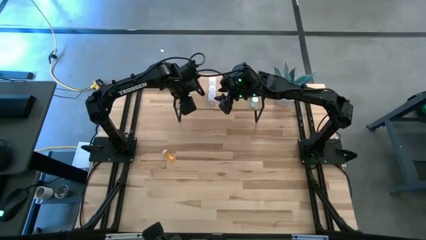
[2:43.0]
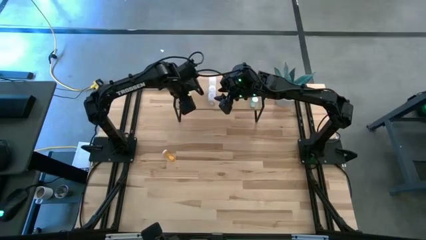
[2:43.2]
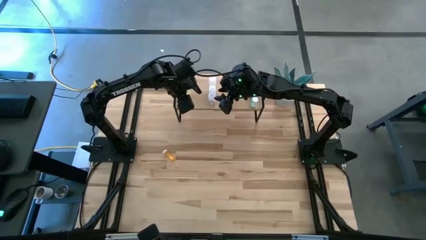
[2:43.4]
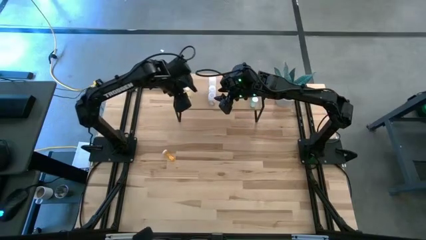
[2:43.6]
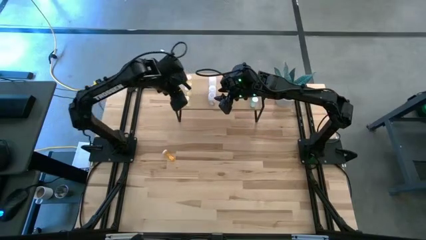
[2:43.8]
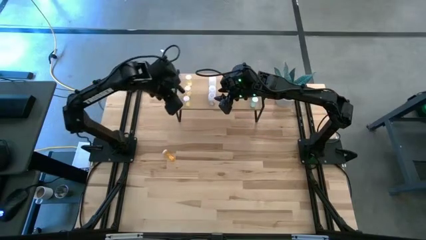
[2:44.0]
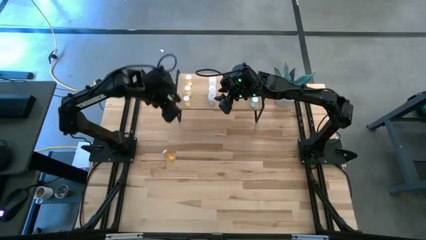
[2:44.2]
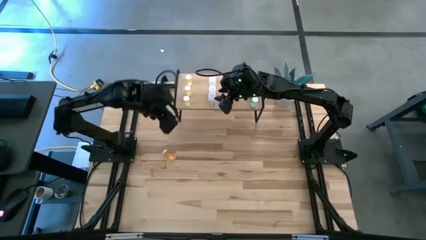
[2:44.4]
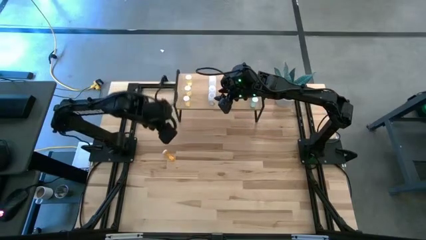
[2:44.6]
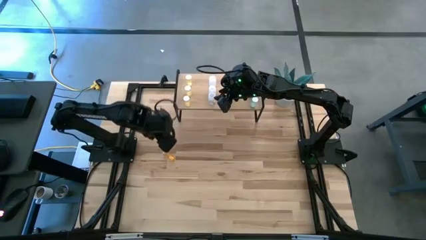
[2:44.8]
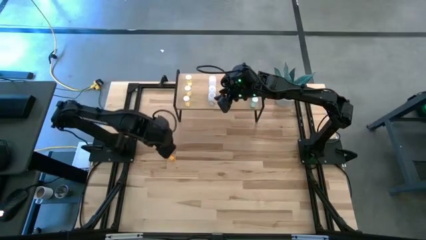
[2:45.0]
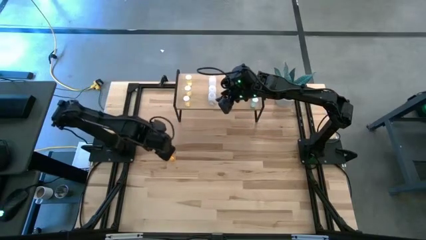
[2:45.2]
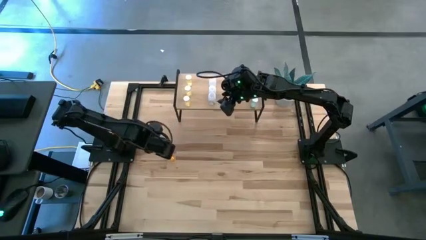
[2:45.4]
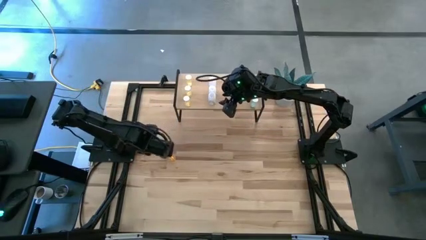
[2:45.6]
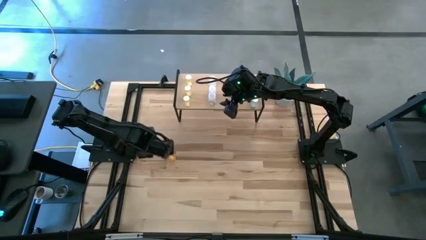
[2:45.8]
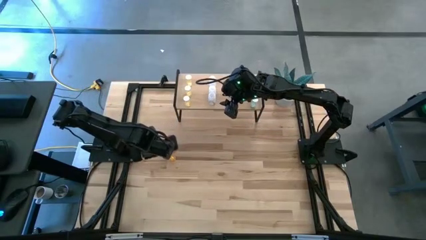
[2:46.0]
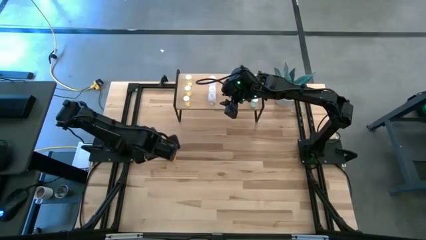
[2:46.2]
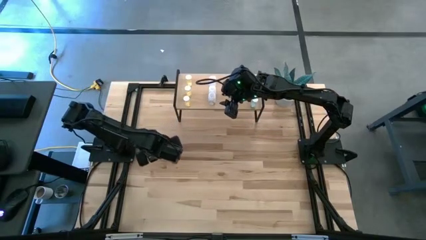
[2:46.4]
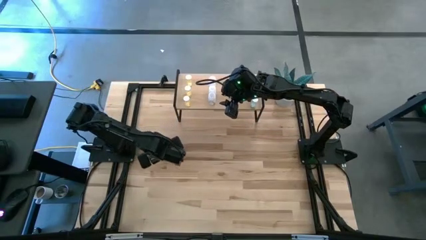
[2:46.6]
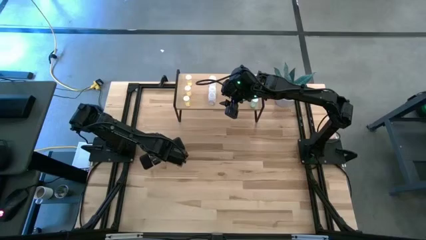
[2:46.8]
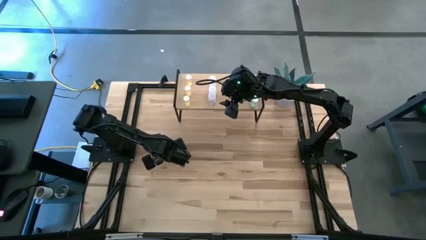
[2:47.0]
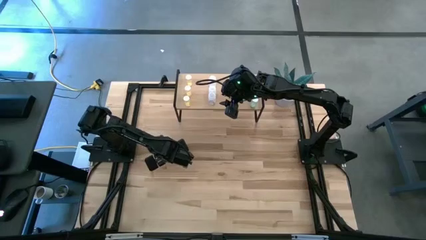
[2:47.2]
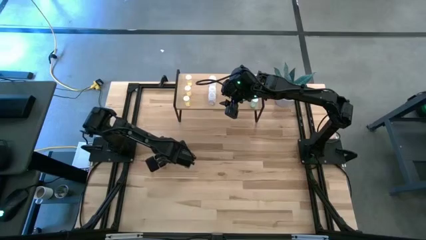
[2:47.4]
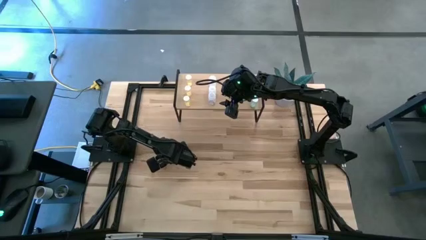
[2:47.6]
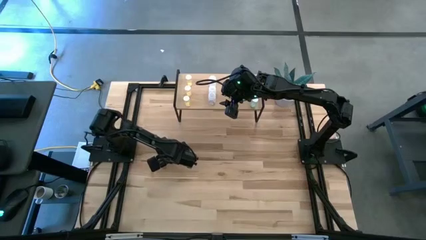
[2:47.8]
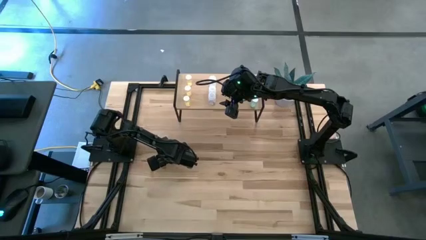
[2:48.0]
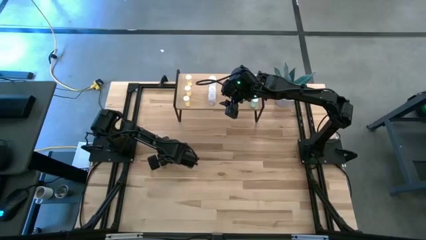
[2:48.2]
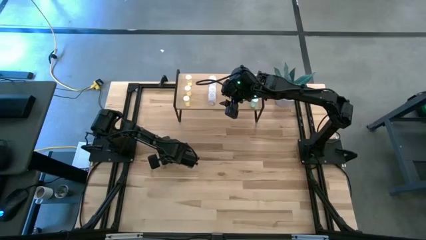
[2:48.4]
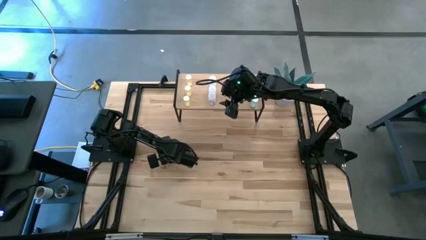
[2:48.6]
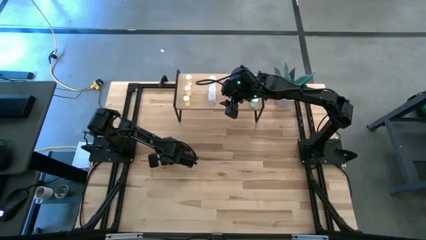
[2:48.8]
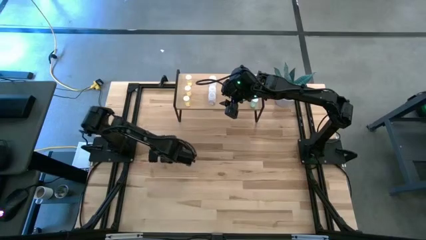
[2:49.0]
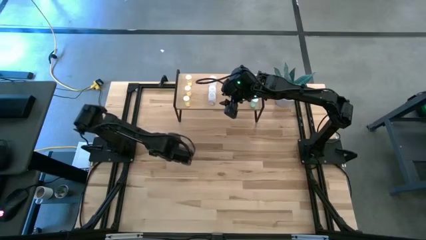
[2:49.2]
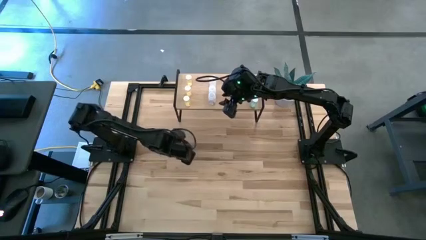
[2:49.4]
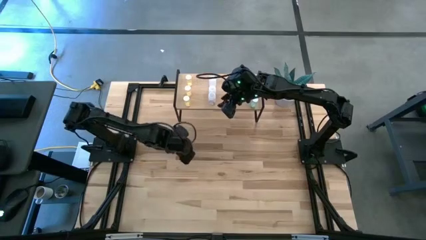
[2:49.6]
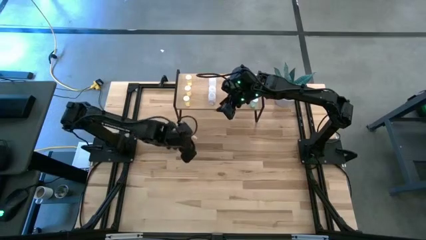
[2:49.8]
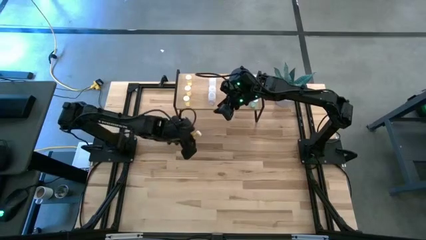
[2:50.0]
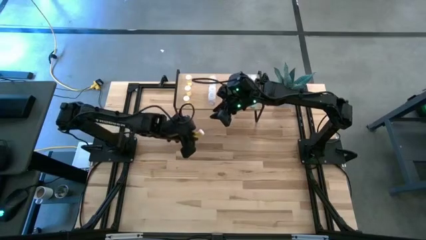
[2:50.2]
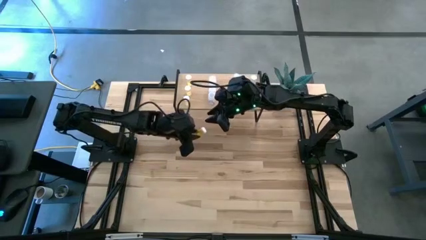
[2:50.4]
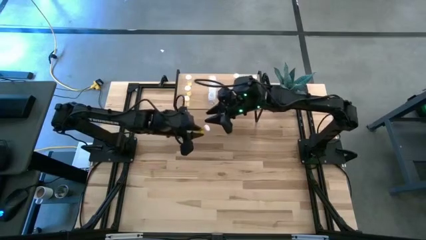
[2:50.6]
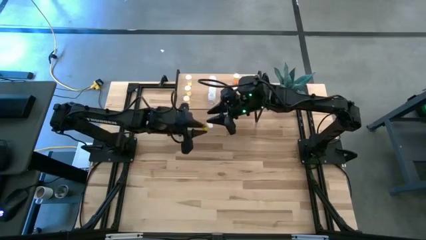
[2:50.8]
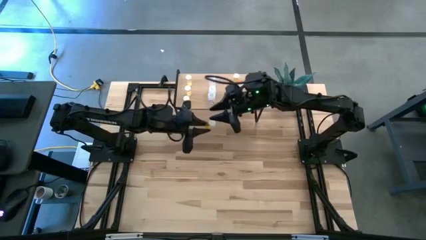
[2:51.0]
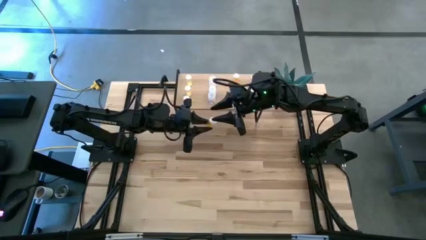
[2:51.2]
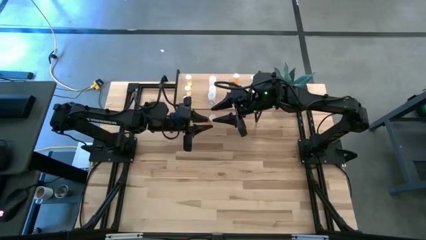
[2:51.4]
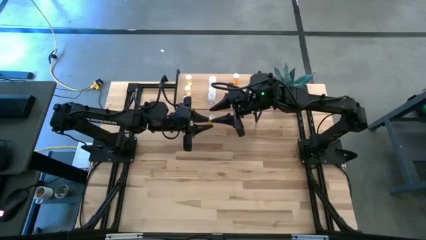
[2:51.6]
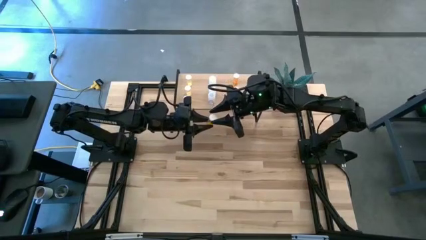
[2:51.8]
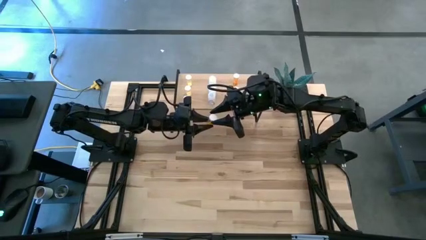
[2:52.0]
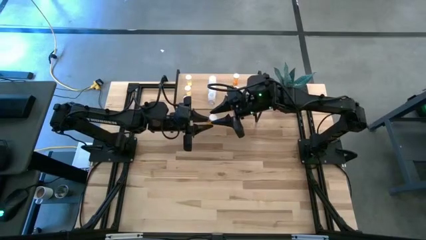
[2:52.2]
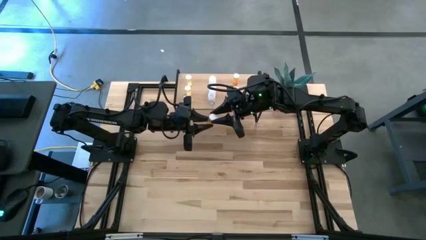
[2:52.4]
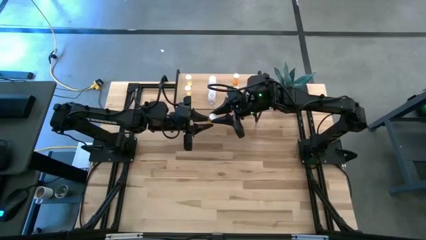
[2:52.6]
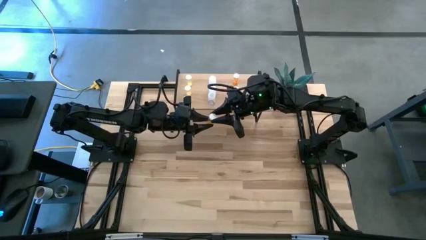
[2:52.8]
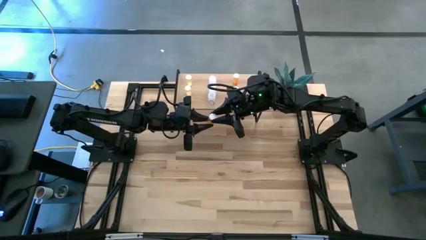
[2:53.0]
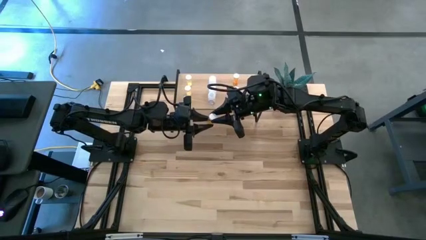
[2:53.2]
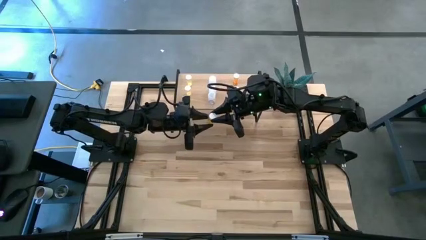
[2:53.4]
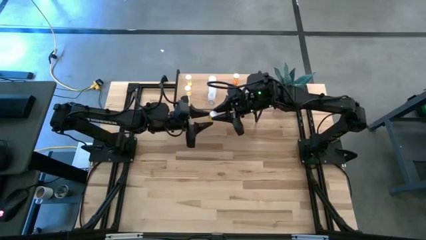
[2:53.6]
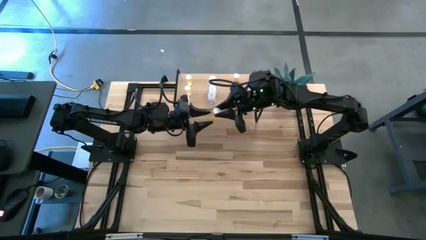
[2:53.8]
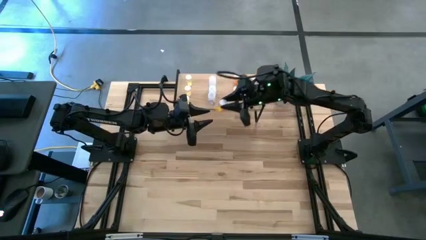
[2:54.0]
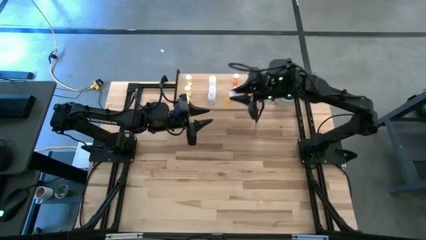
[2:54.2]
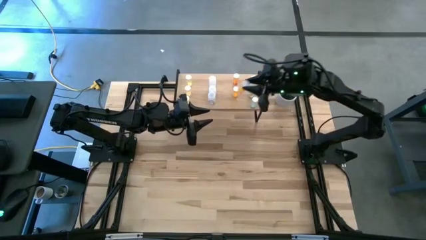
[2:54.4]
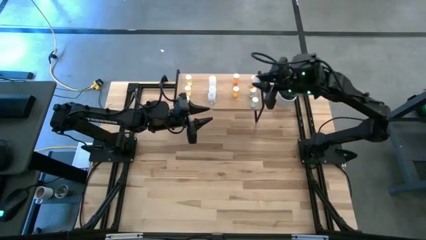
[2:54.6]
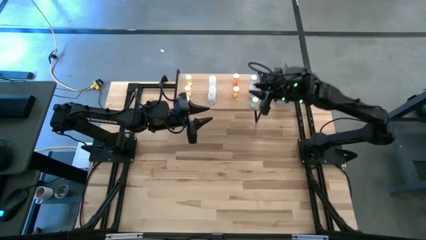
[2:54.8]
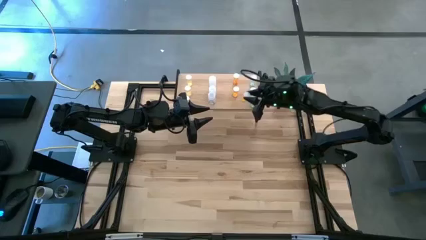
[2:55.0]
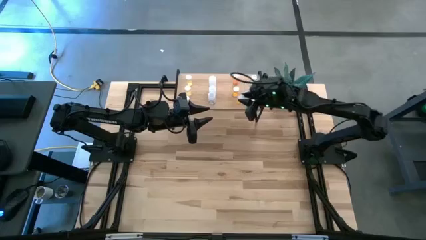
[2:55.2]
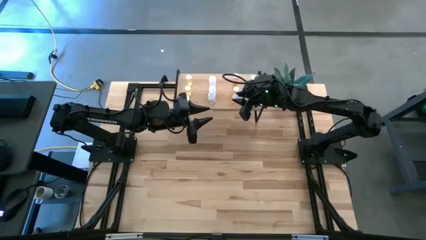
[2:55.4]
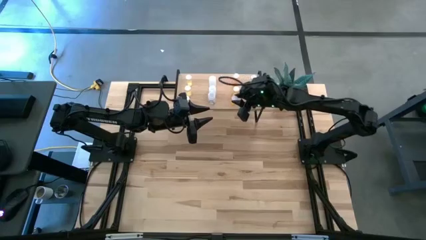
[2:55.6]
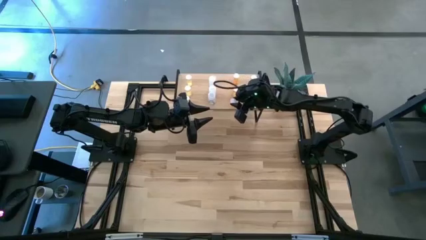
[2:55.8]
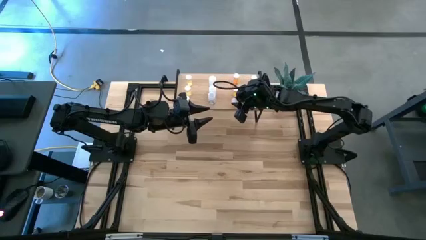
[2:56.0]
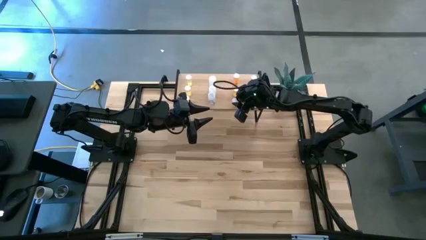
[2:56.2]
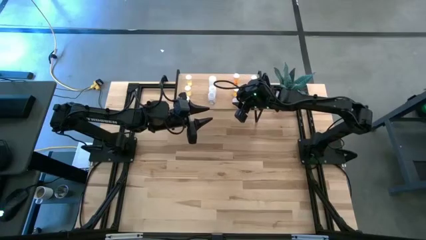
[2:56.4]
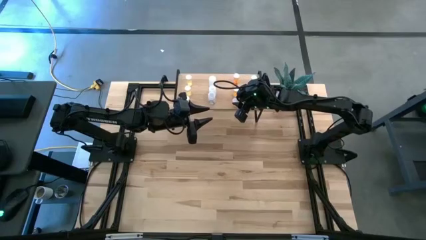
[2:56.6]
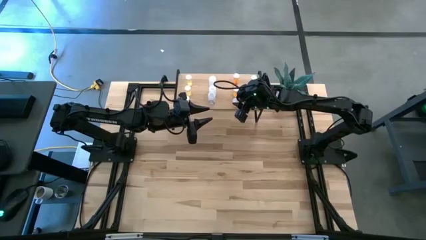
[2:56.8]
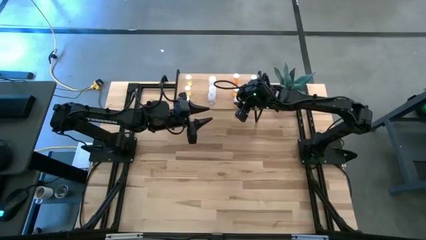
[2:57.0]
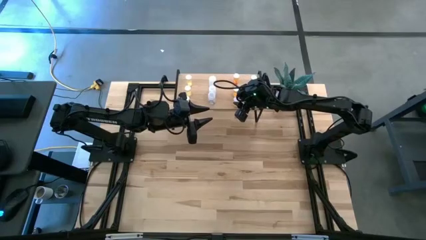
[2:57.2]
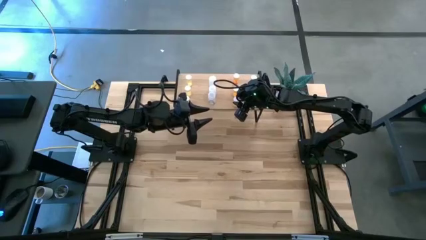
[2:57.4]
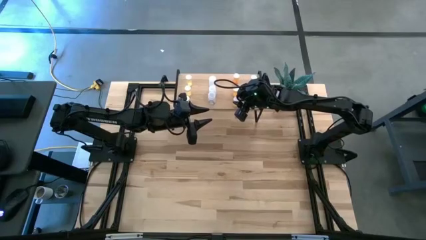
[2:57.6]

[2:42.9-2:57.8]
Task: Pick and place medicine bottles onto shelf by color
Put the orange medicine bottle on the shelf aligned with the other orange medicine bottles

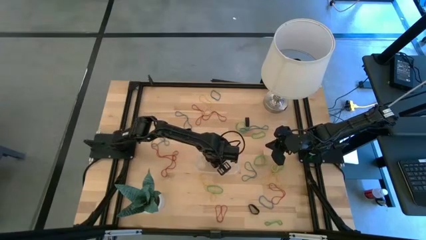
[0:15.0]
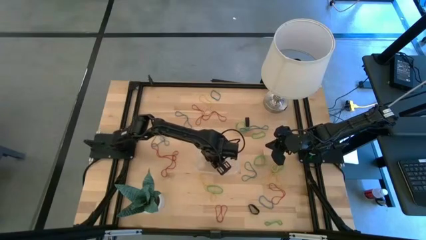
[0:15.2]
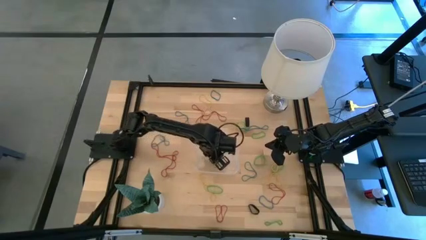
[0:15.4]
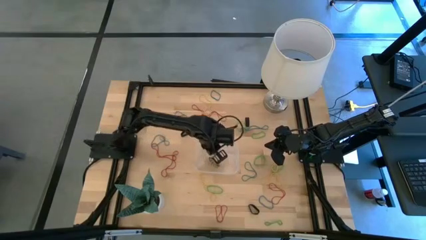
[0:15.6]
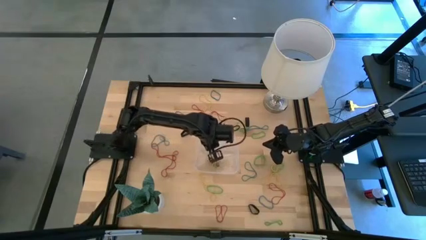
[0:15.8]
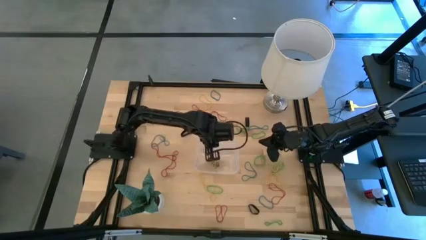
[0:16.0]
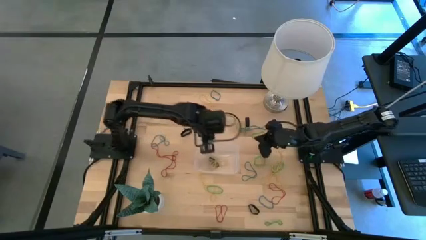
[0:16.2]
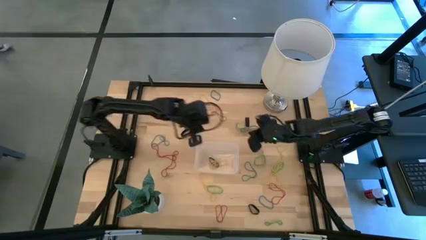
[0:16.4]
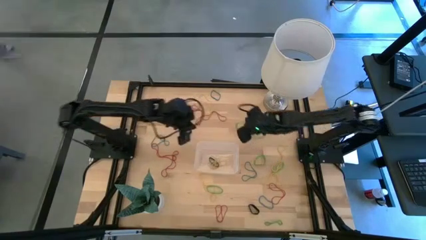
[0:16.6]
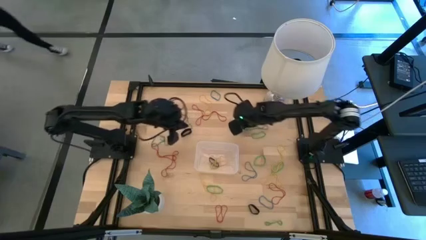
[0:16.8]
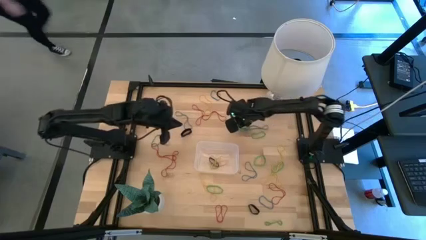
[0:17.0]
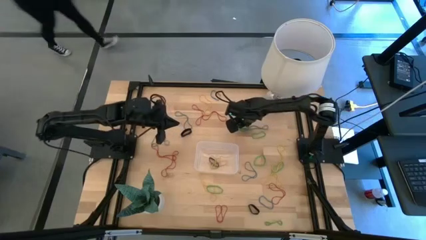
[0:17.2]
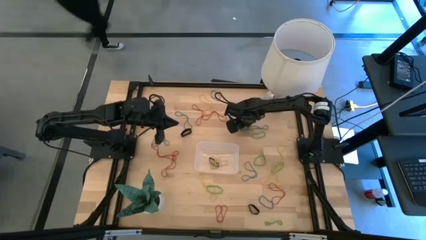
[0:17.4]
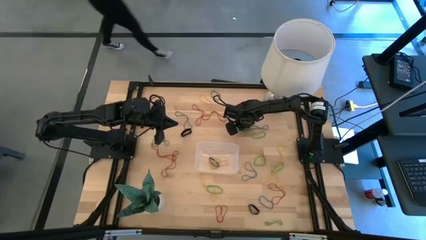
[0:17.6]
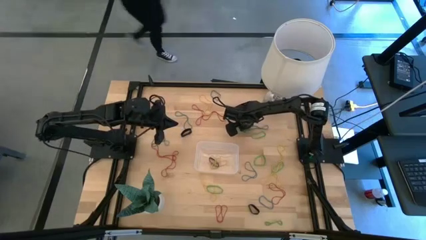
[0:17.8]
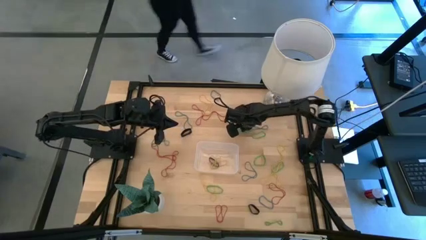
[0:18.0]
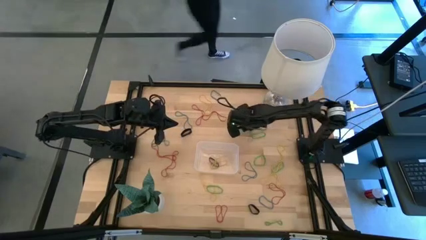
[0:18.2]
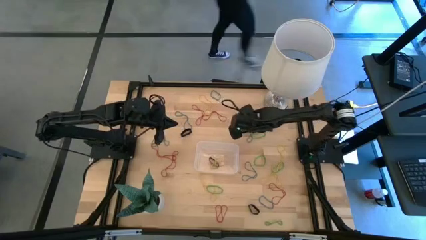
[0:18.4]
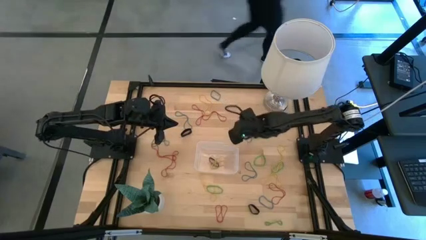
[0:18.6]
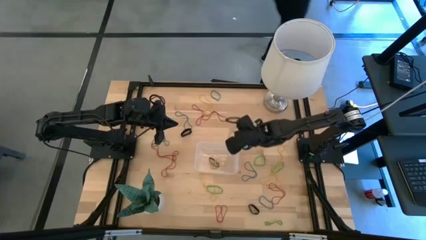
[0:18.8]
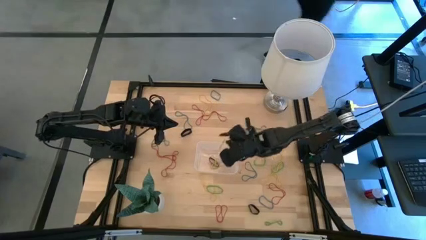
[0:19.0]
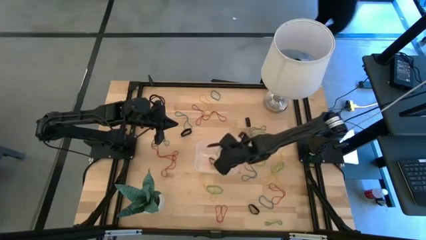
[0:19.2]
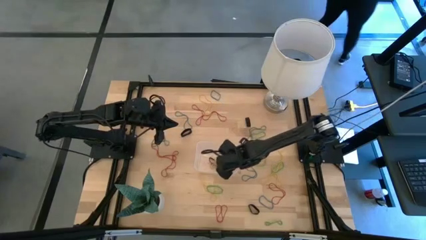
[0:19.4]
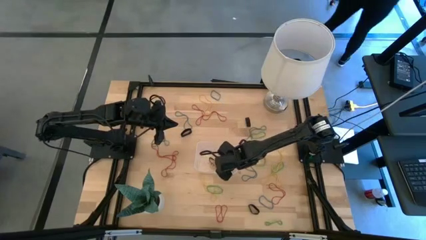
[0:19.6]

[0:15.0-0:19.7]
Task: Pick and place rubber bands into bin
Put the green rubber band into the transparent bin
